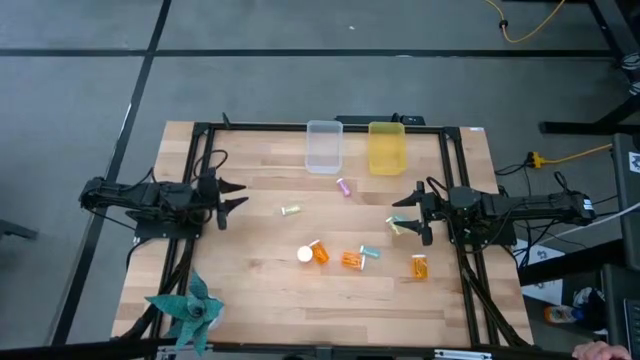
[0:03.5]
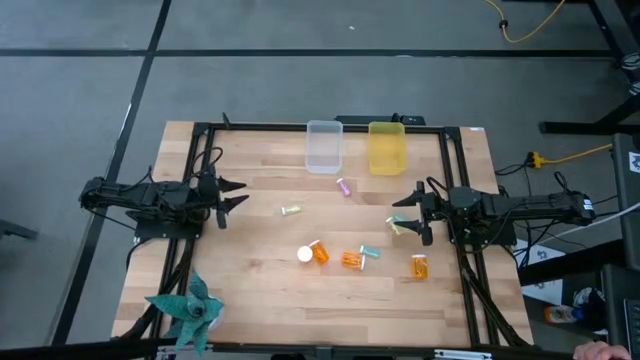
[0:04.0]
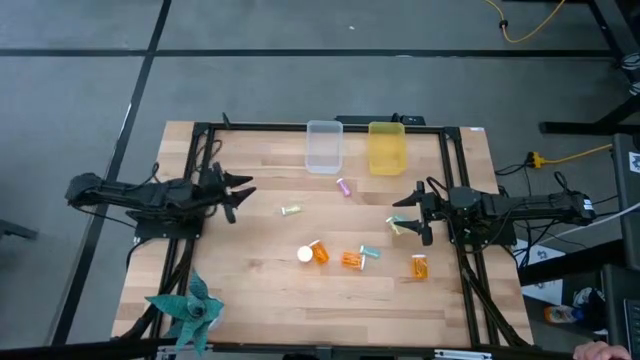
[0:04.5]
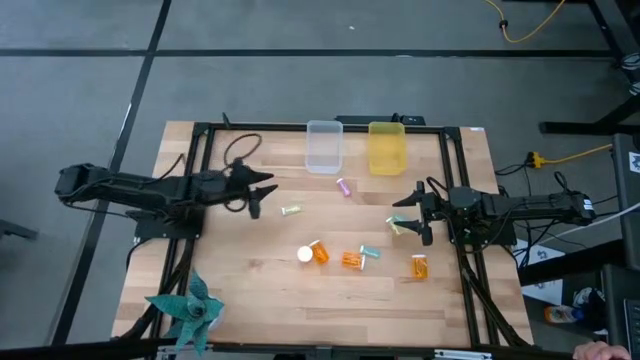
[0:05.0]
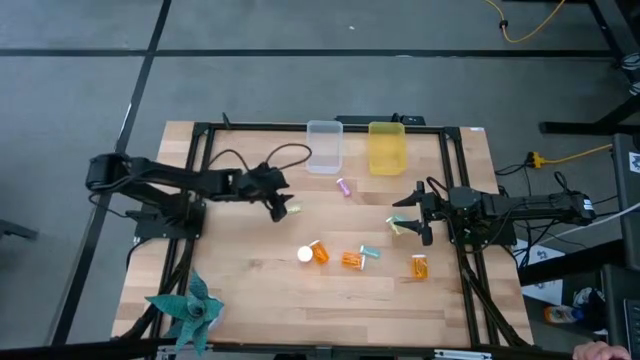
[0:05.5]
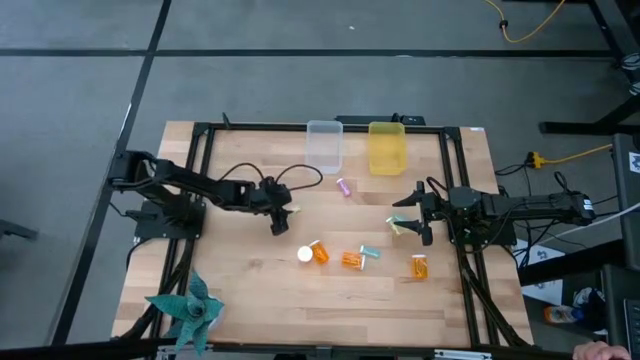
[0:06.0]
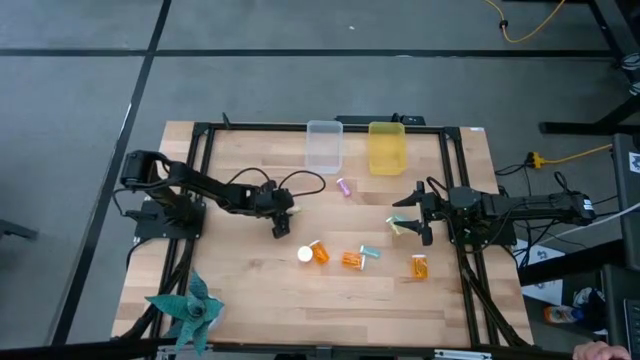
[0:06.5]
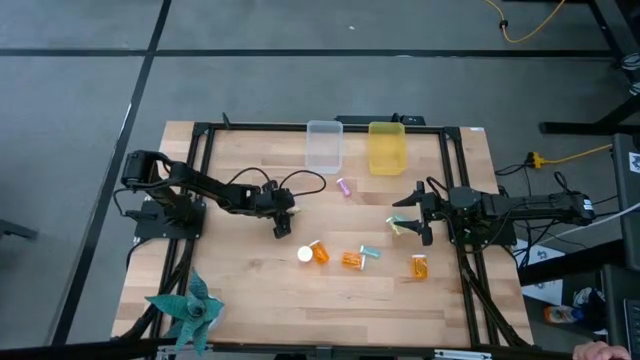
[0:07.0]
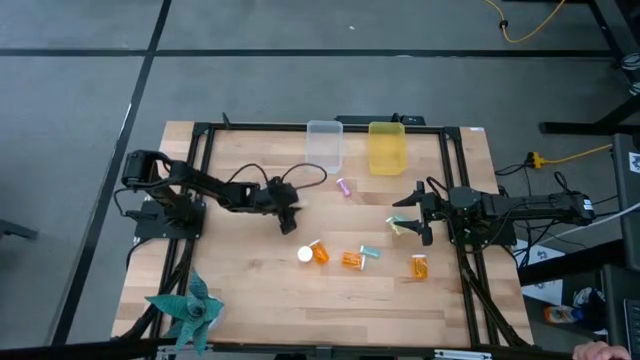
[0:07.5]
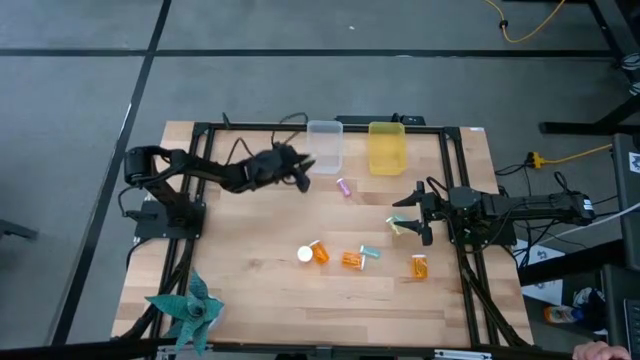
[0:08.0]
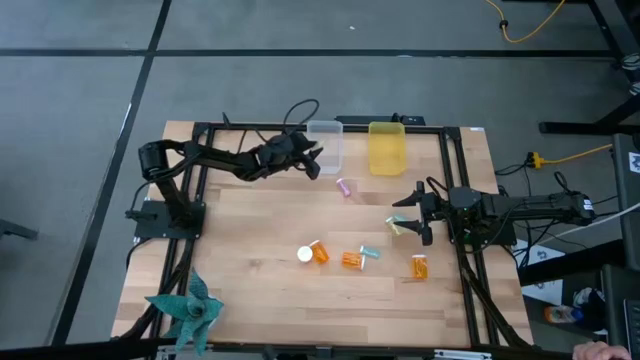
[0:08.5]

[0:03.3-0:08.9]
Task: Pick and place medicine bottles into bin by pill shape (circle, oval)
Put the small yellow pill bottle into the transparent bin

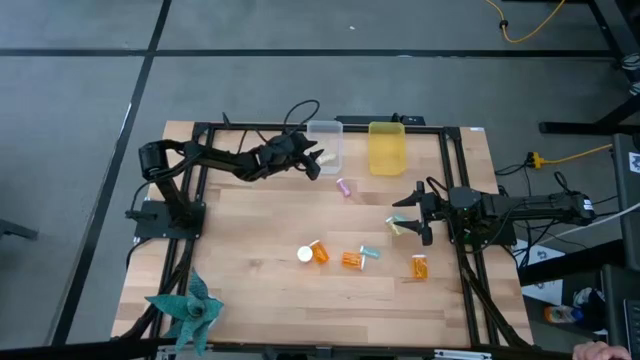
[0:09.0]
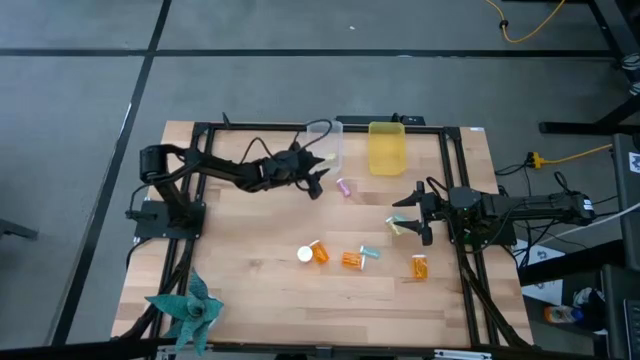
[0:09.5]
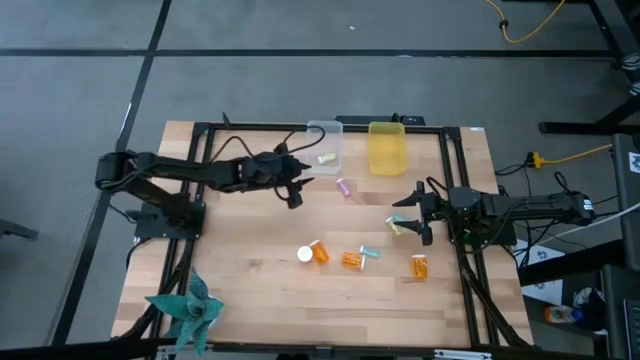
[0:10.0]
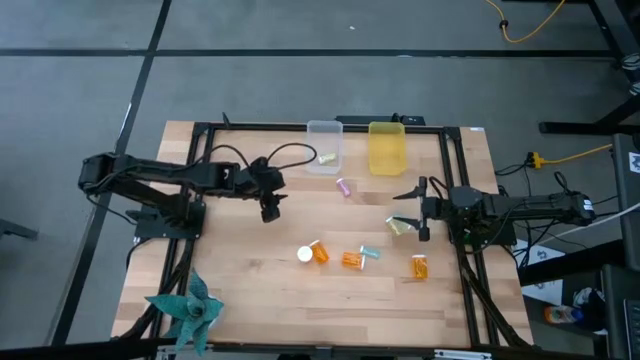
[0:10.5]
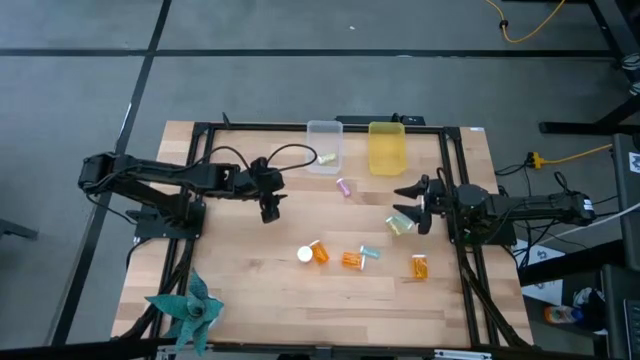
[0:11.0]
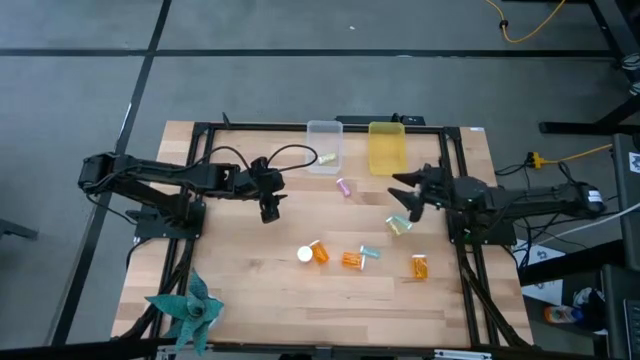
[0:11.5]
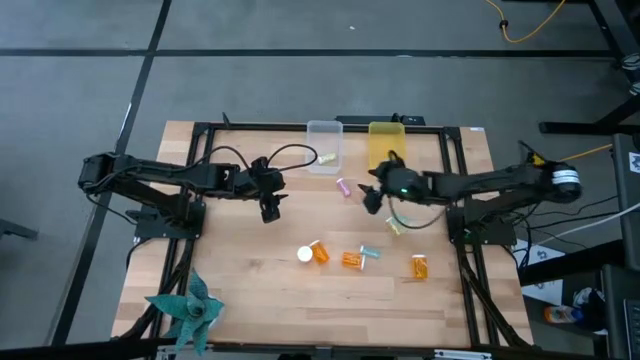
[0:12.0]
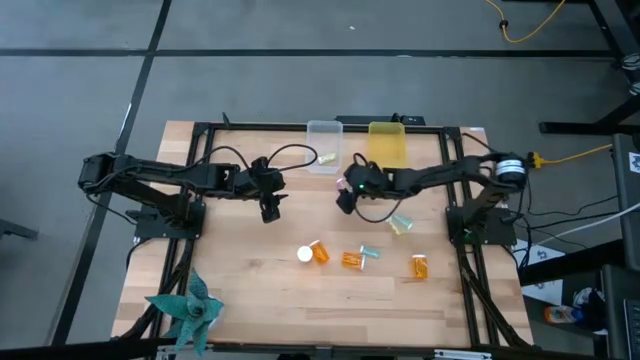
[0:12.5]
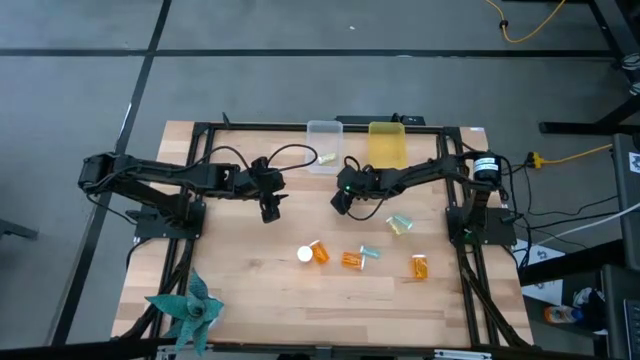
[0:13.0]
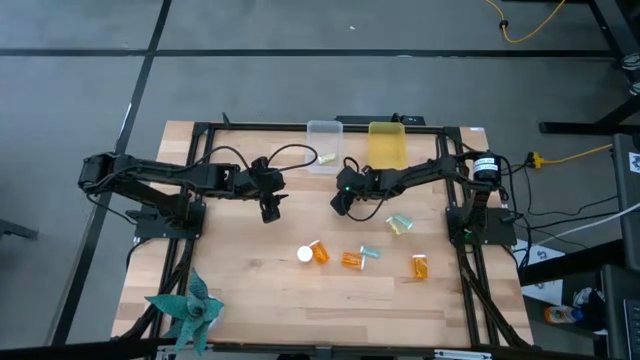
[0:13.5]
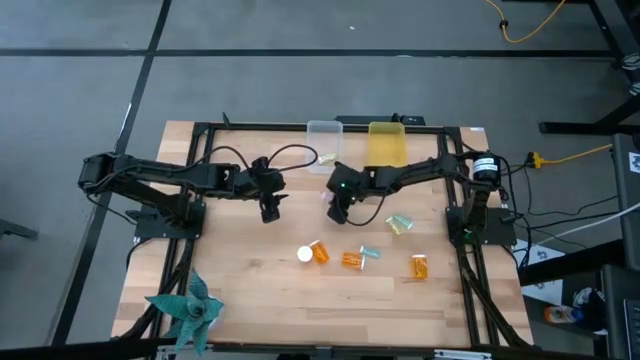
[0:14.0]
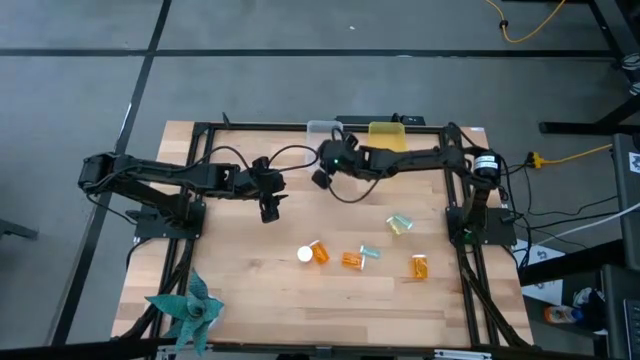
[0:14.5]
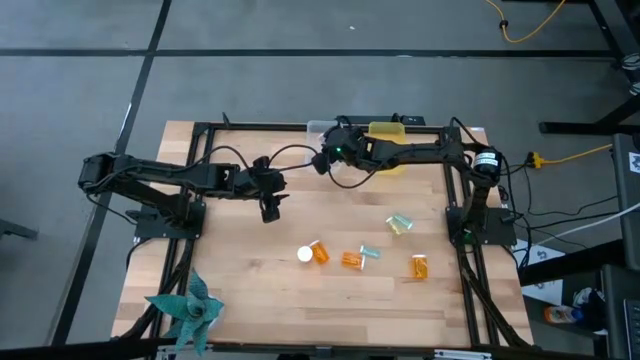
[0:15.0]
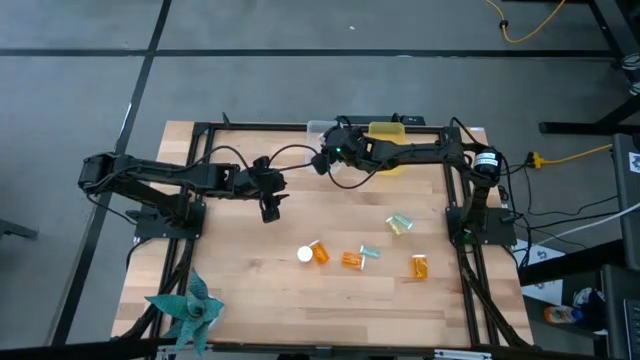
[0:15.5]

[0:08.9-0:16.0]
Put the small pink pill bottle into the transparent bin

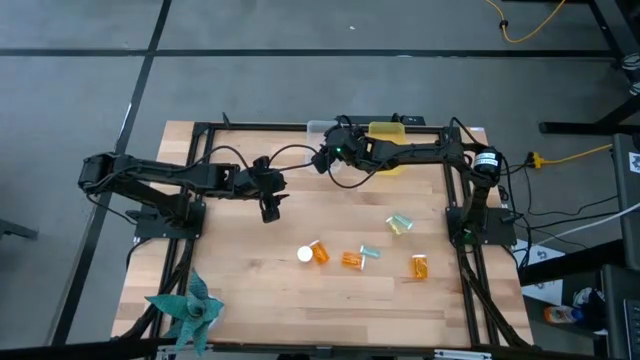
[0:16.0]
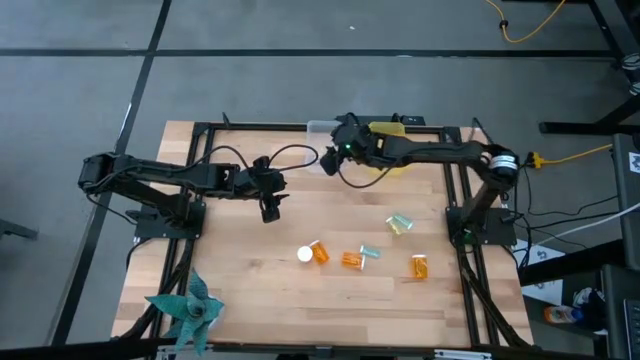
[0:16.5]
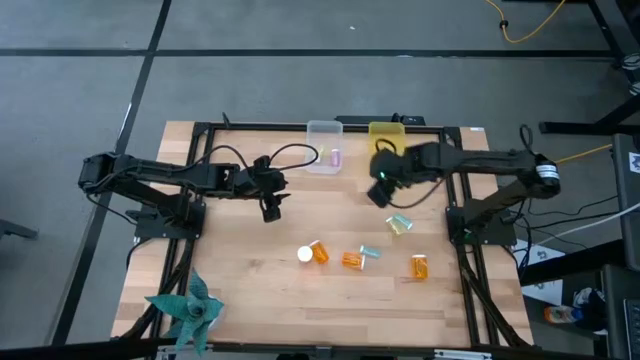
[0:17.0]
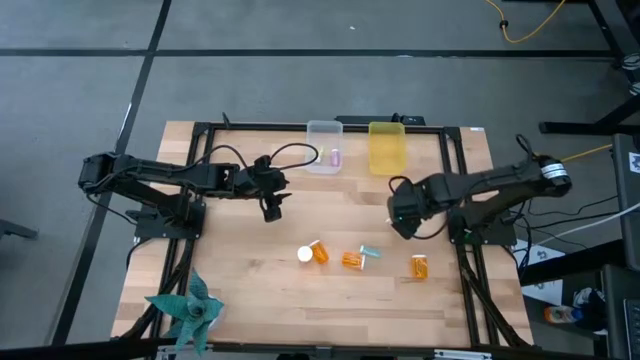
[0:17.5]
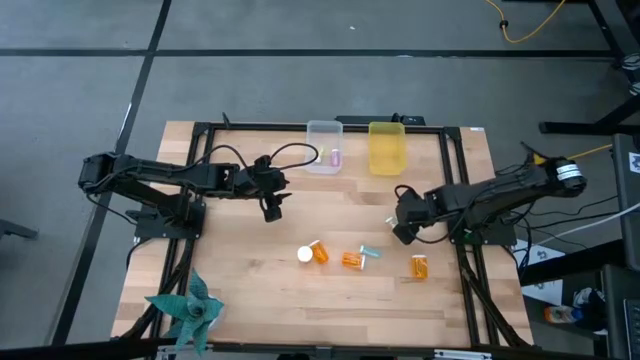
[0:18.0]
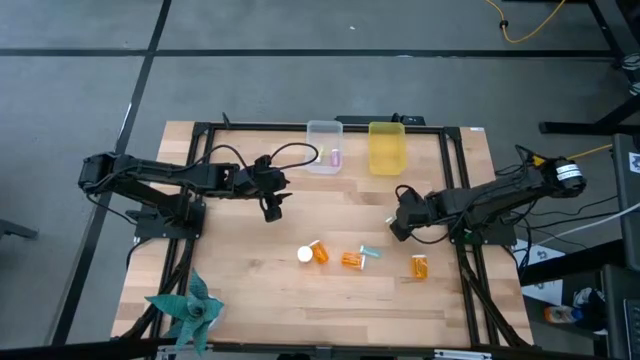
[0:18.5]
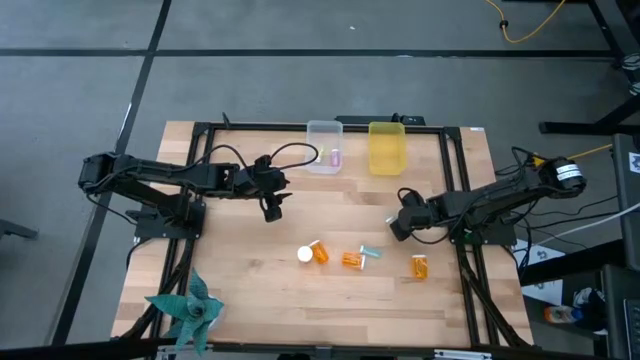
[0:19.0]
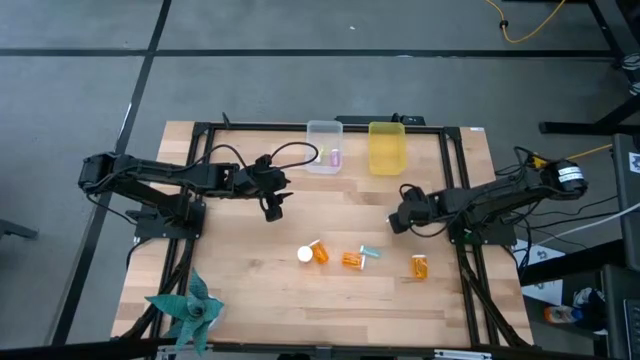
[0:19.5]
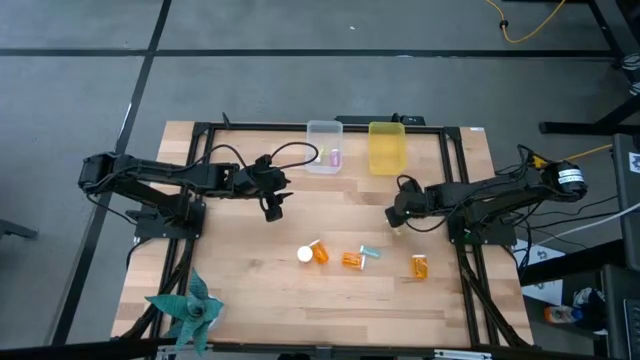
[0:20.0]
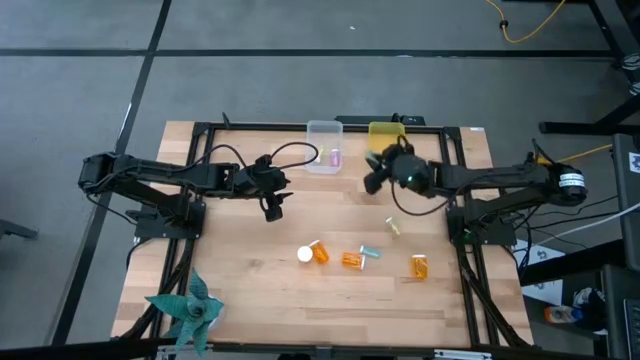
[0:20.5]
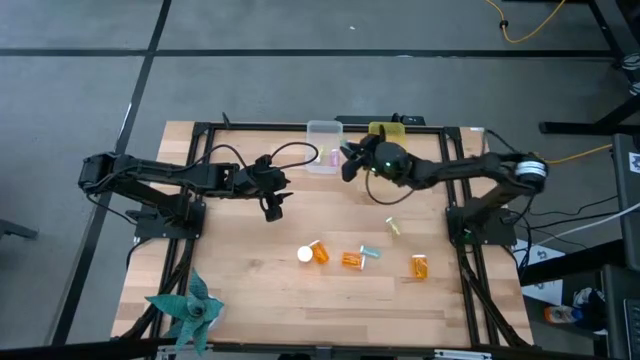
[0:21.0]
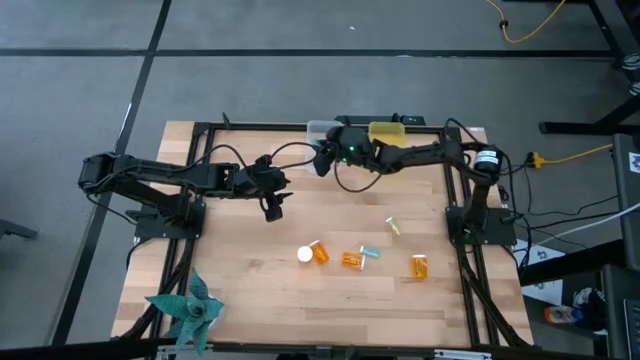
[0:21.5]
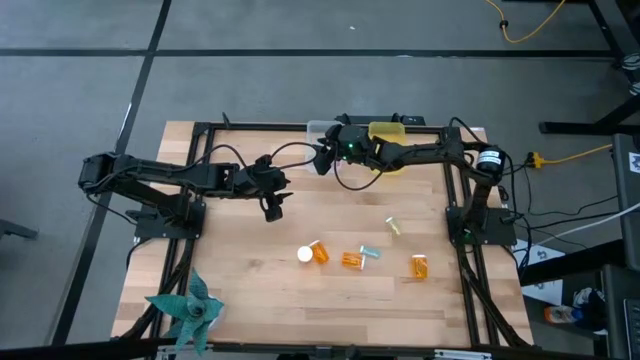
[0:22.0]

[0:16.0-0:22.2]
Put the small blue pill bottle into the transparent bin

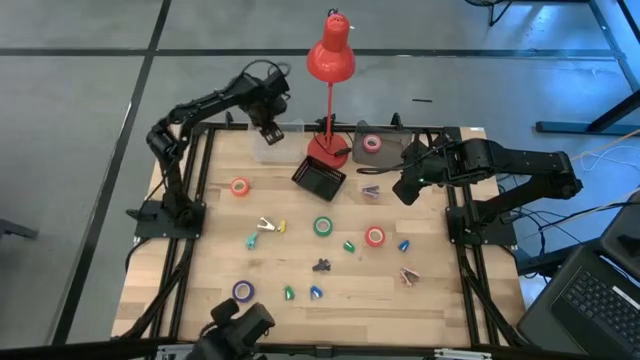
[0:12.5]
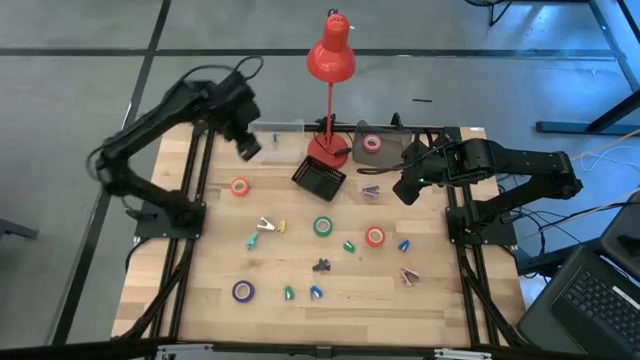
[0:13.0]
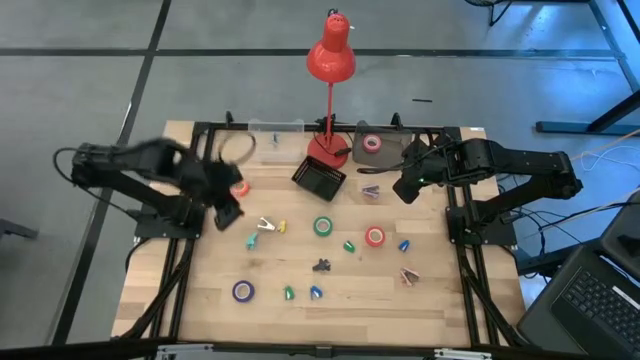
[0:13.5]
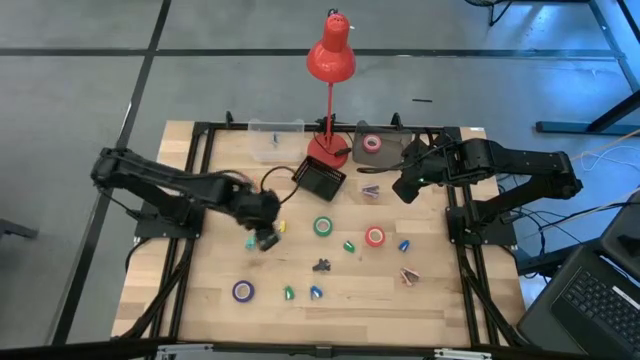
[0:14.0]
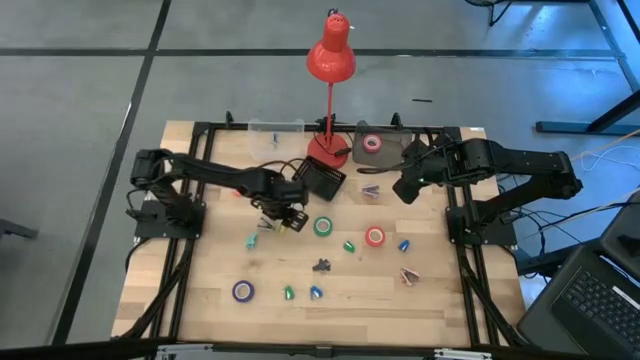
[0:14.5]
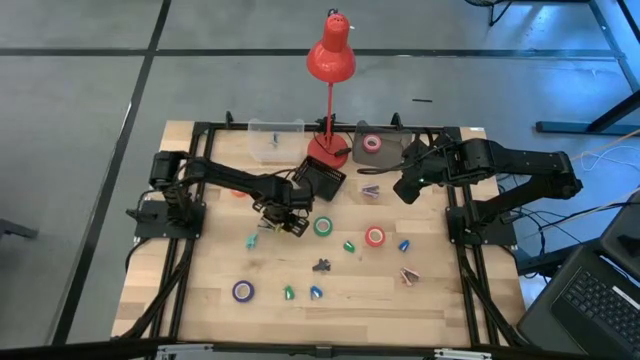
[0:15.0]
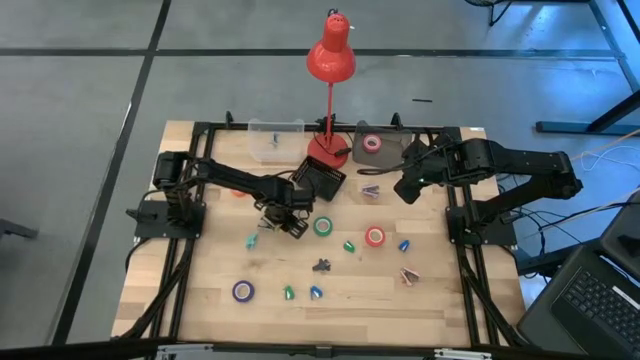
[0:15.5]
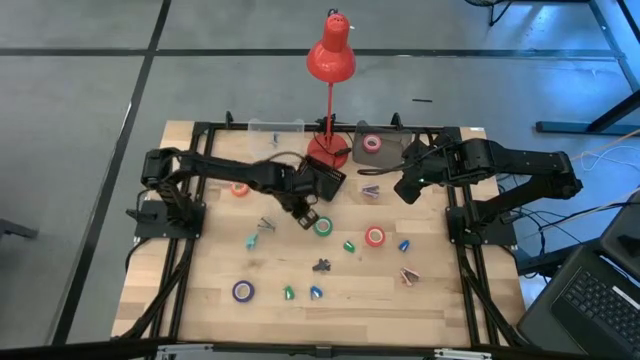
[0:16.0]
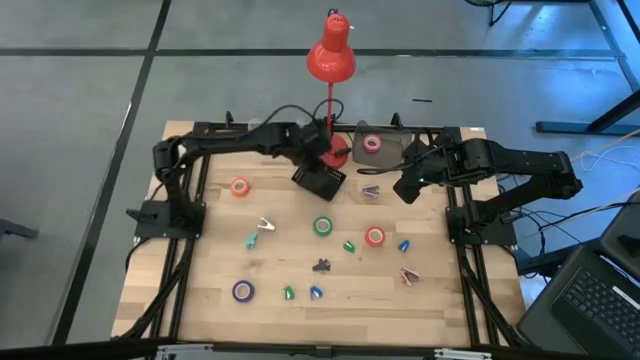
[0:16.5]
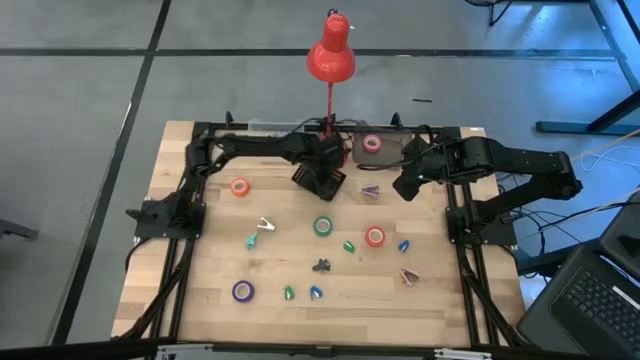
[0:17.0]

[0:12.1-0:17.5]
Task: Pick and place Stapler, Stapler remover, tape
Put the yellow stapler into the black bin
